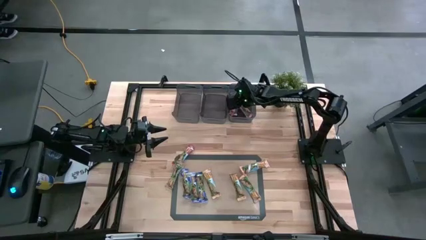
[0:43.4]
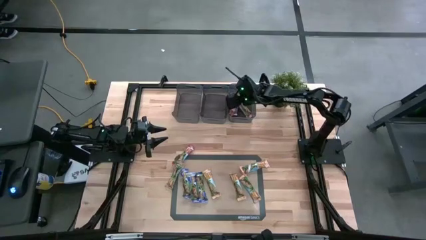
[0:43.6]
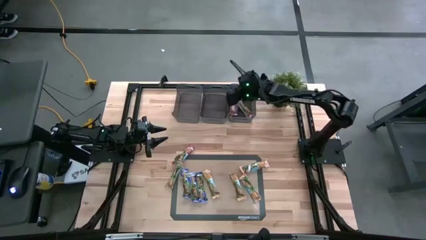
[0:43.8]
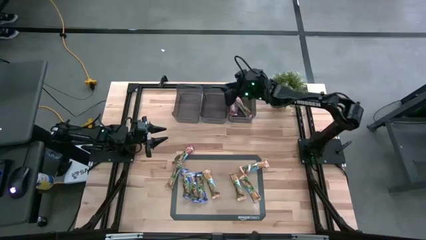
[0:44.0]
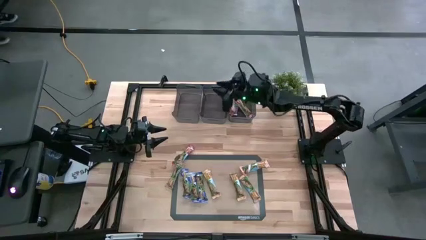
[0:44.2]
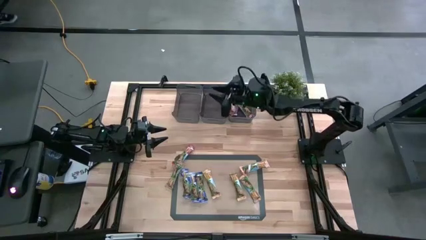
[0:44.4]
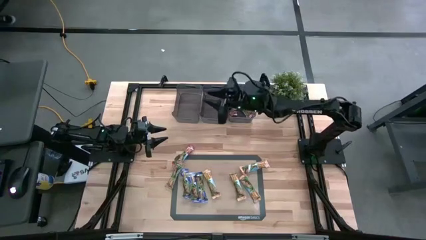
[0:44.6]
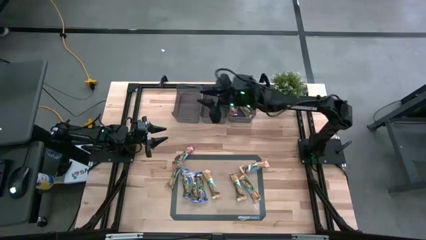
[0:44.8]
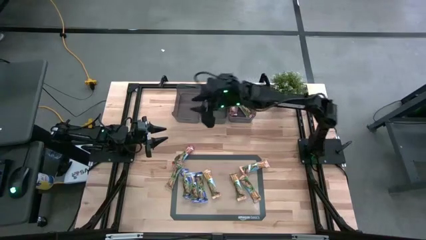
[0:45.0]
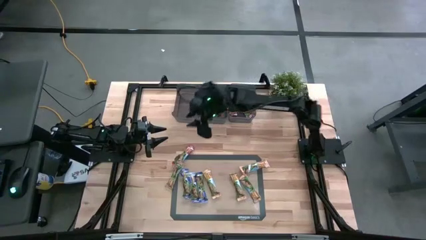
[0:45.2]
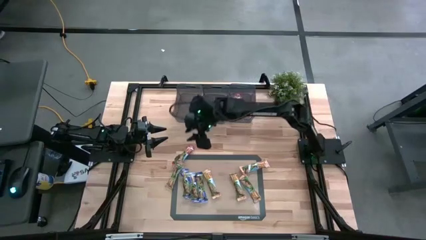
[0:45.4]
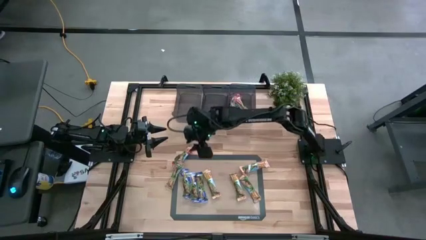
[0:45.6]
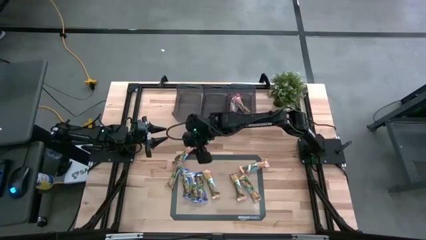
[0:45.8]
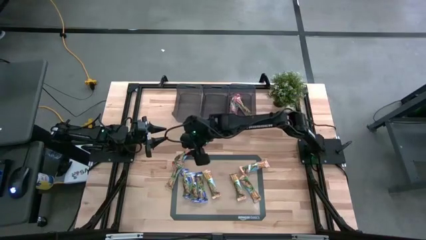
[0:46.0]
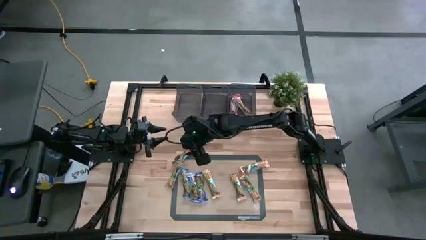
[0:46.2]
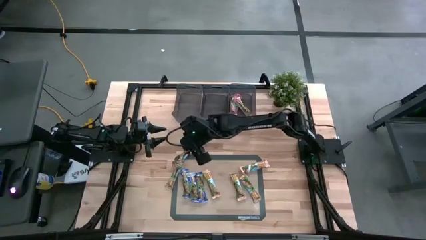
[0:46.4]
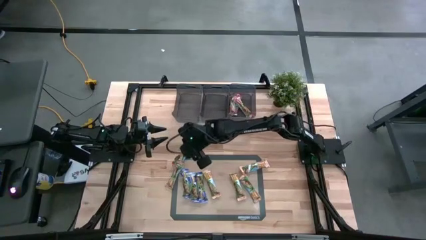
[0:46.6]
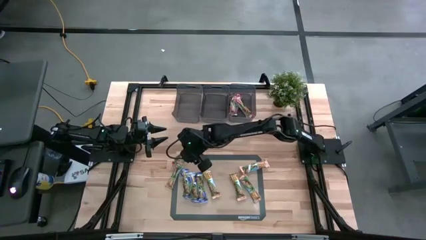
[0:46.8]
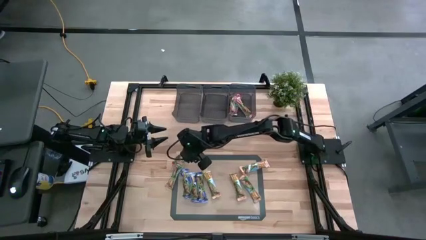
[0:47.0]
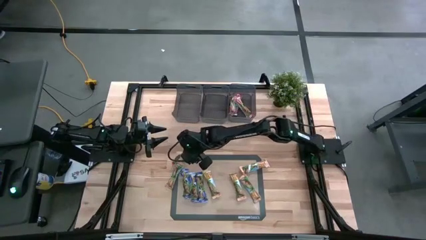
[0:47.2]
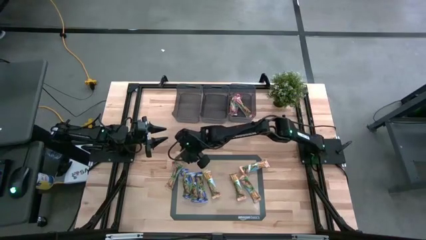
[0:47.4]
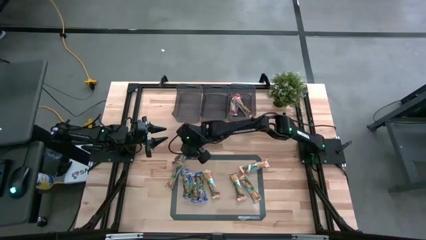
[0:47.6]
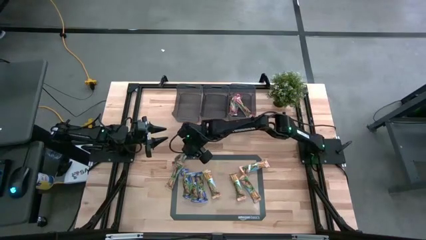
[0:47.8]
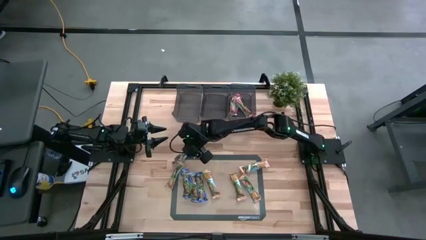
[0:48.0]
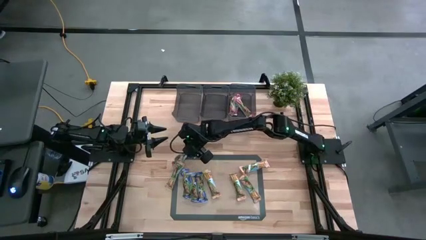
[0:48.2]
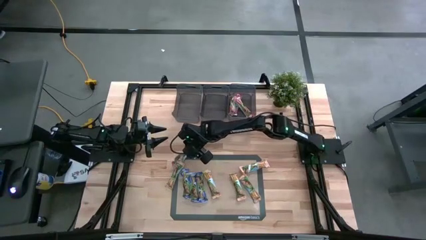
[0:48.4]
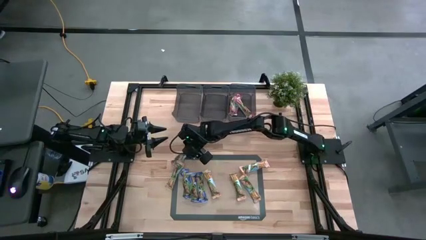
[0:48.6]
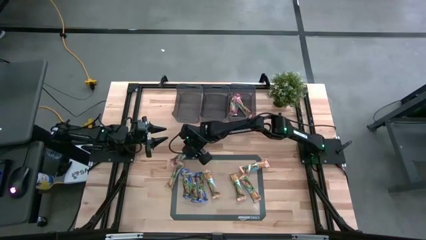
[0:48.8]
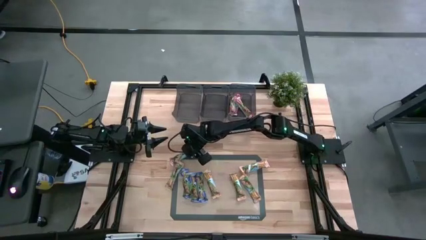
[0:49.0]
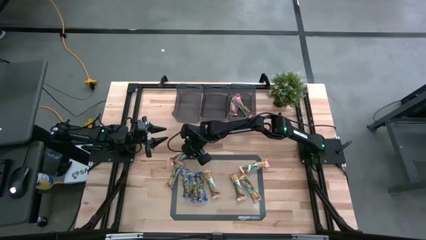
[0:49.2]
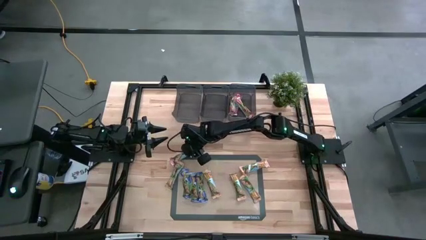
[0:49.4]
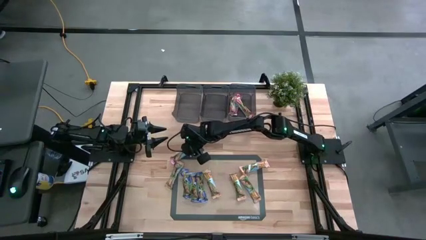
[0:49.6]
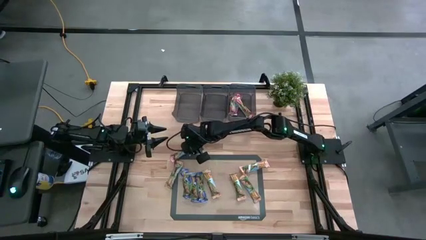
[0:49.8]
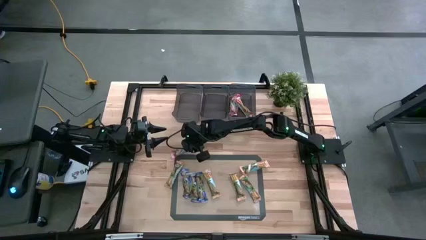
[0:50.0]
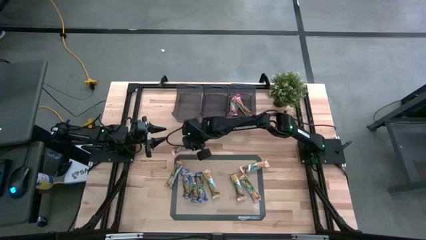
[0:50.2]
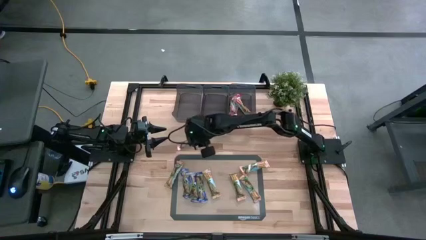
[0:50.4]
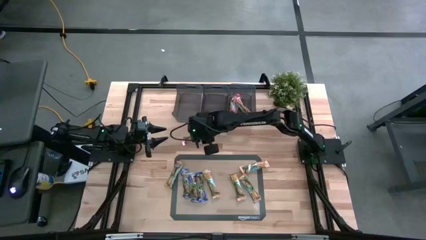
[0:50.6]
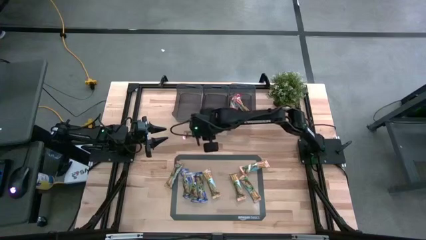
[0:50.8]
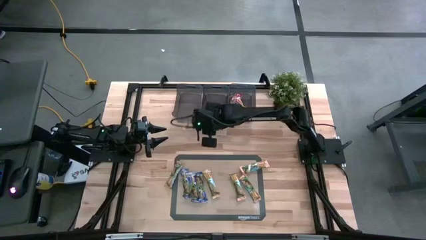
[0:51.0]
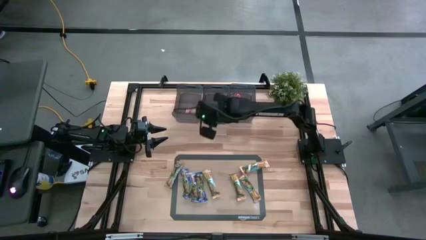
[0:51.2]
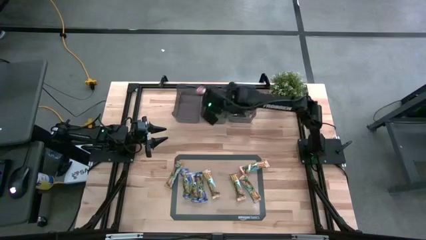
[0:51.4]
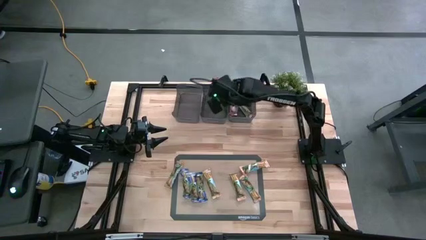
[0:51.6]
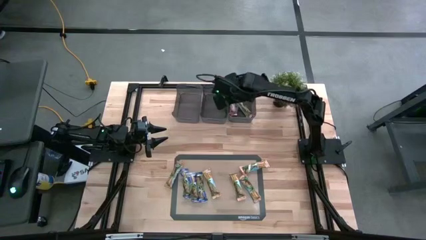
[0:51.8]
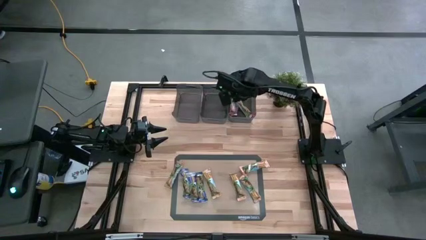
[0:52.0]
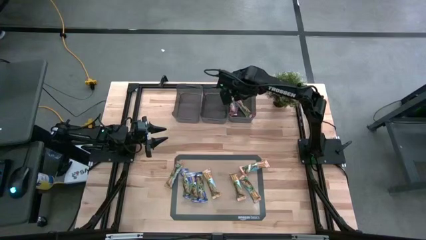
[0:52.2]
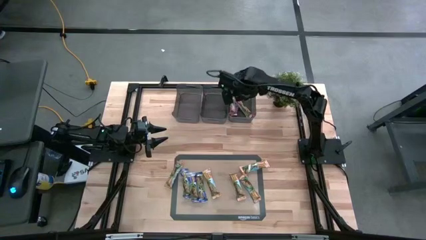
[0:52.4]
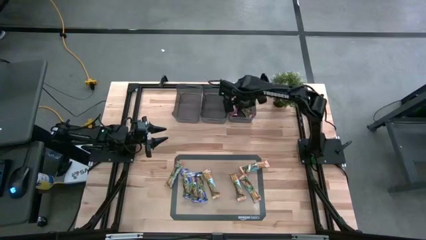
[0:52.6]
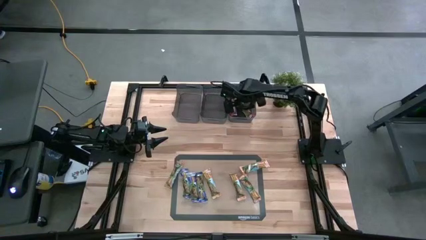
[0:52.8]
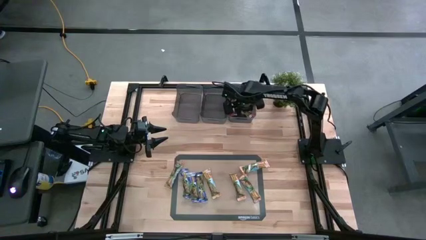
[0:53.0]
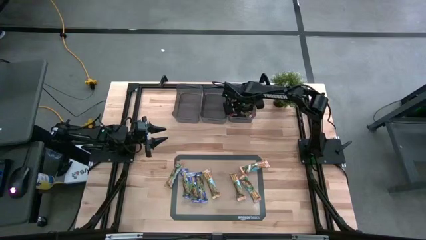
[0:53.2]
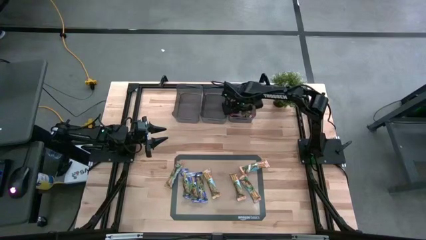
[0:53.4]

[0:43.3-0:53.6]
Task: Pick and place Granola Bars by type
Put the red granola bar into the right black bin
